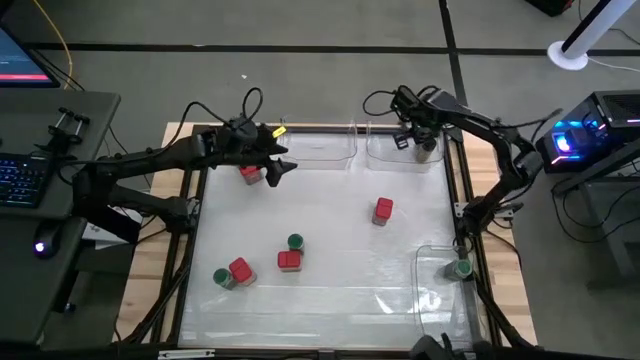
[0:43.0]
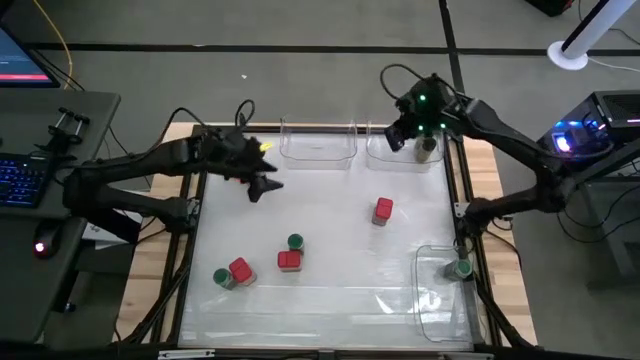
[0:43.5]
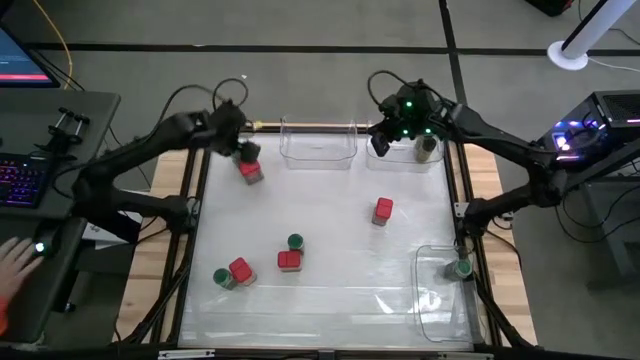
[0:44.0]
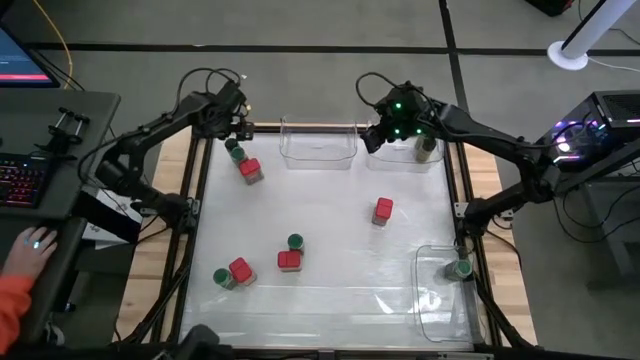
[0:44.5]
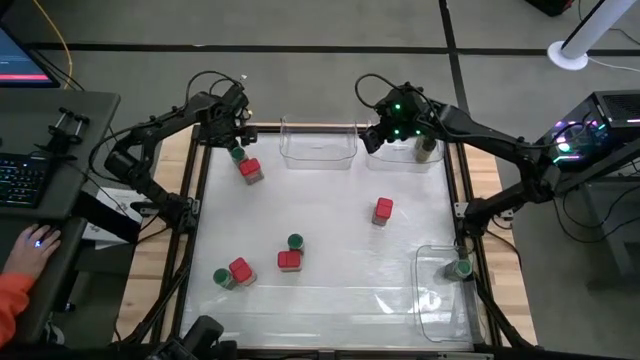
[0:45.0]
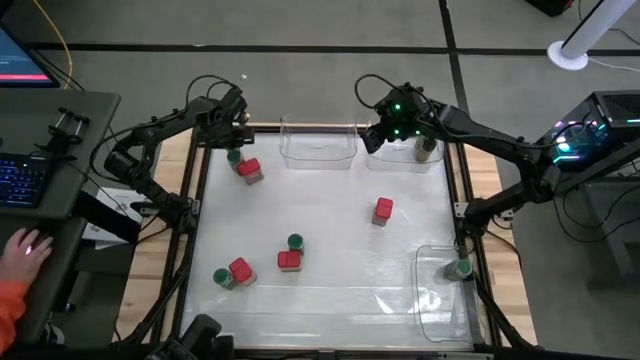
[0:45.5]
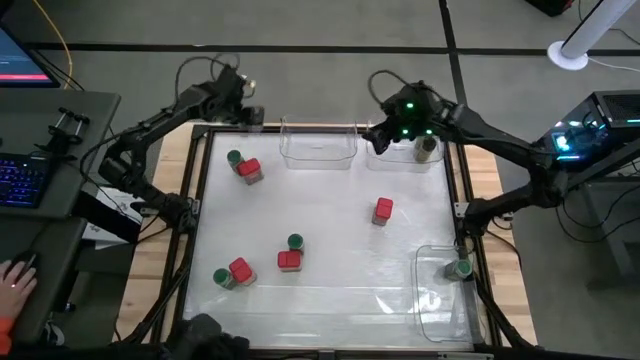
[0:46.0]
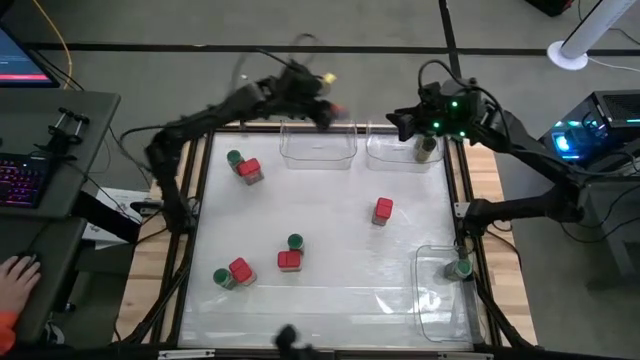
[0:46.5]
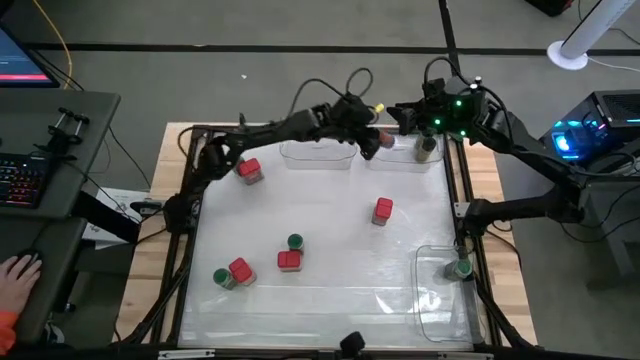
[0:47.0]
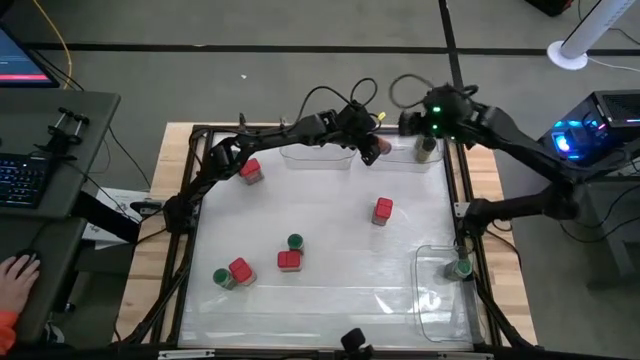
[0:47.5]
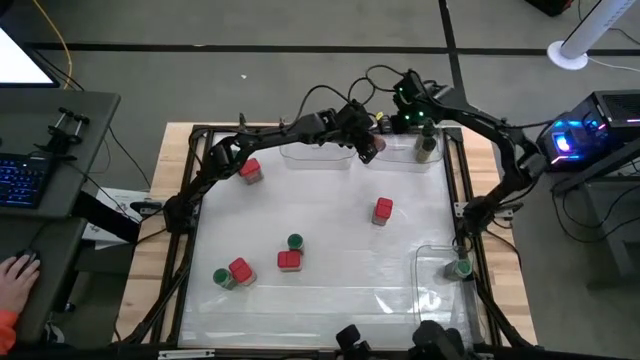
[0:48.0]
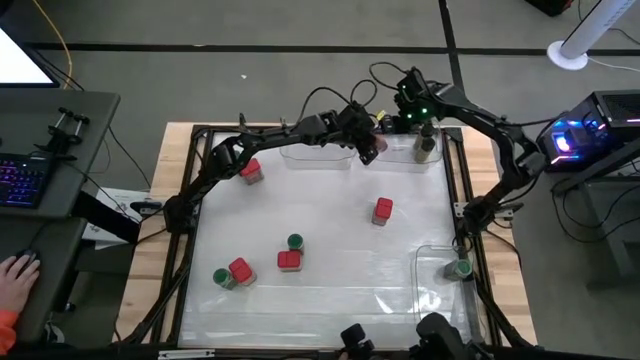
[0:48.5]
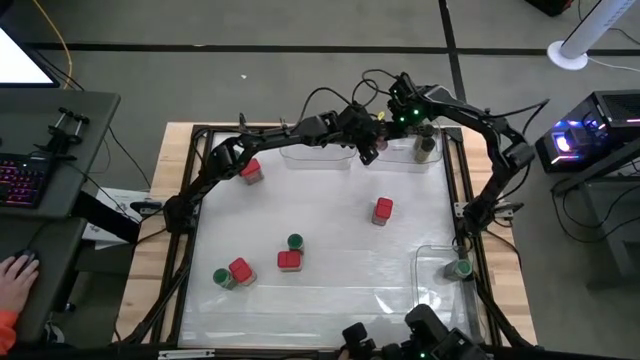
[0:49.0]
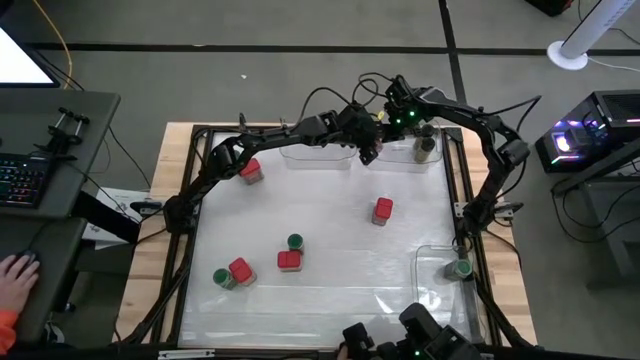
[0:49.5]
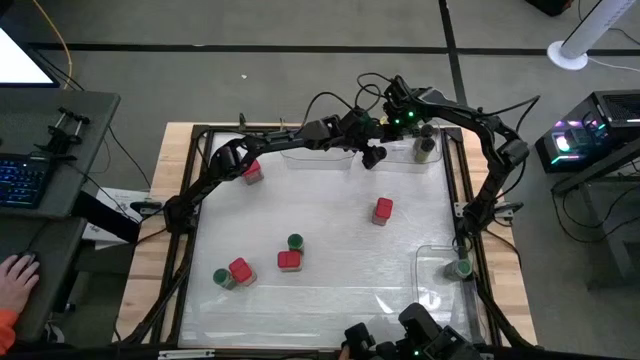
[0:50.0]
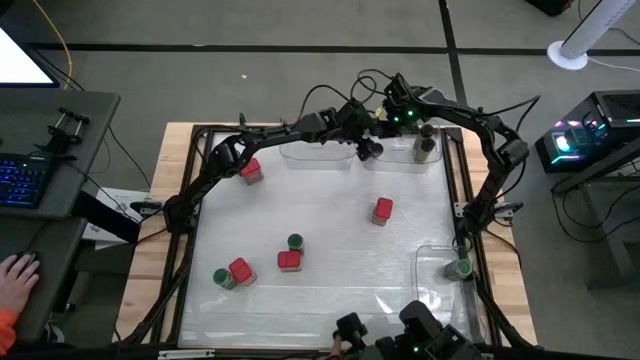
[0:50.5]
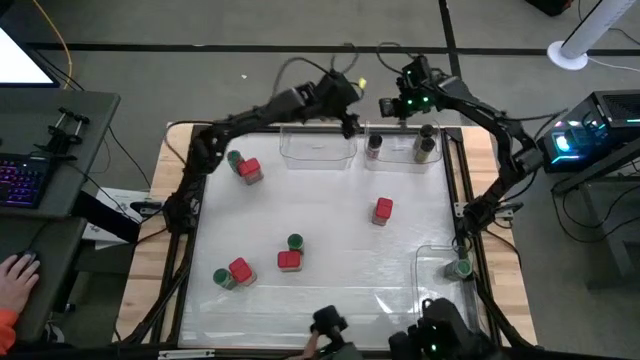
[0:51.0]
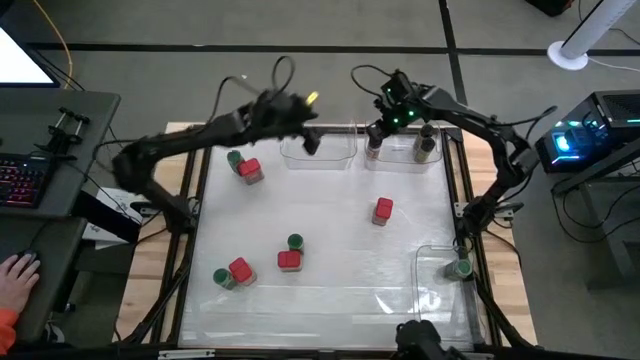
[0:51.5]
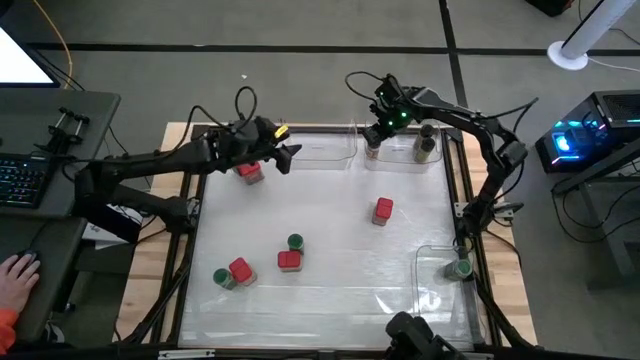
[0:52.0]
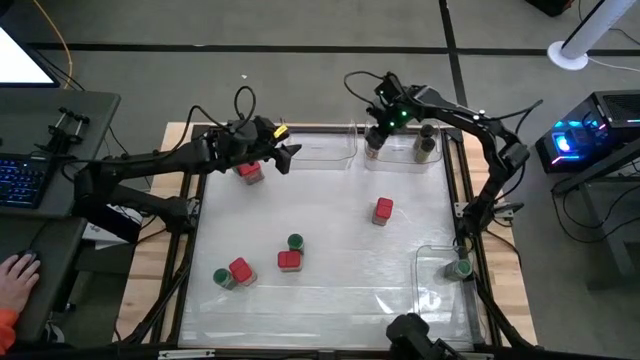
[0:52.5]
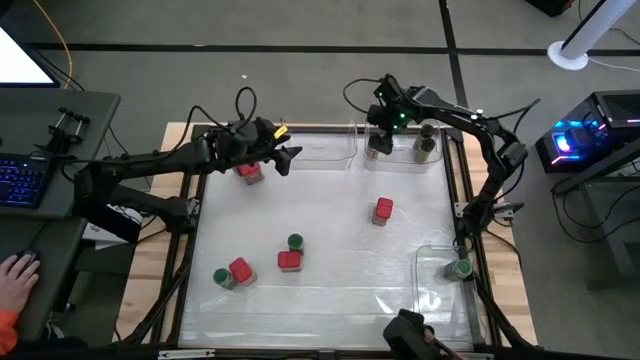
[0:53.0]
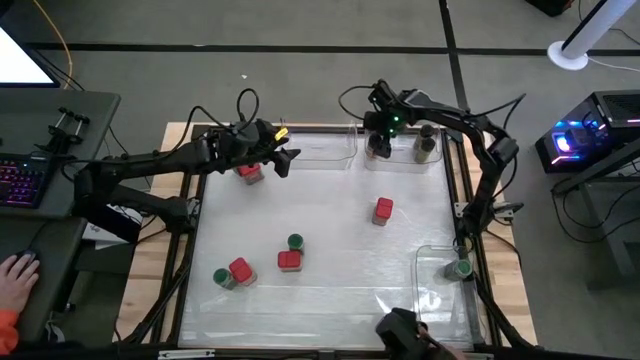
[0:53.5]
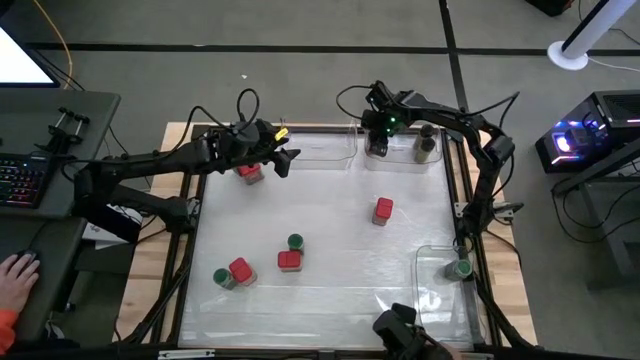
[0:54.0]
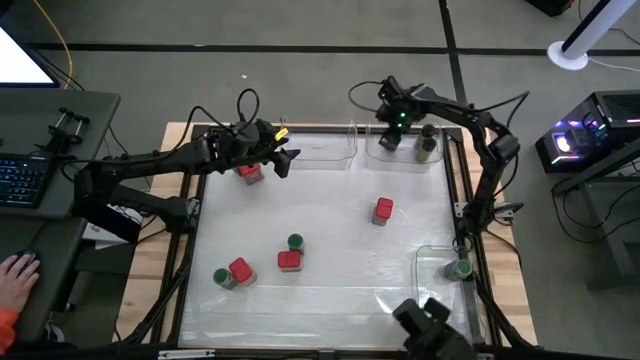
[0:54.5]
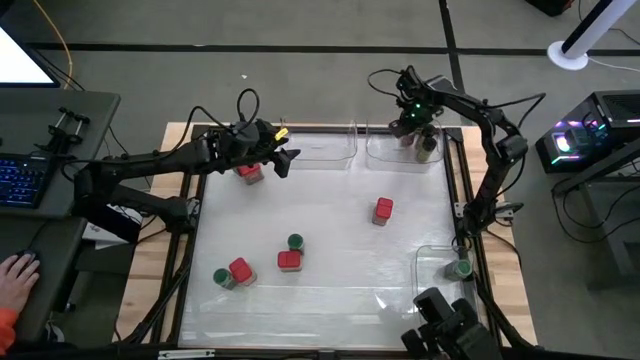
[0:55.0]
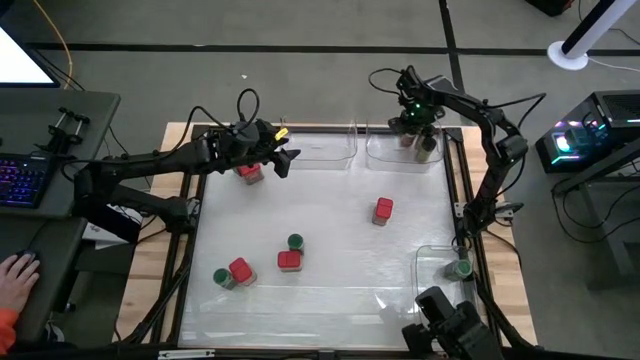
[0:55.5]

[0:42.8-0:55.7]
Task: Sort spices by type
Put the black seasoning bottle into the top right transparent bin

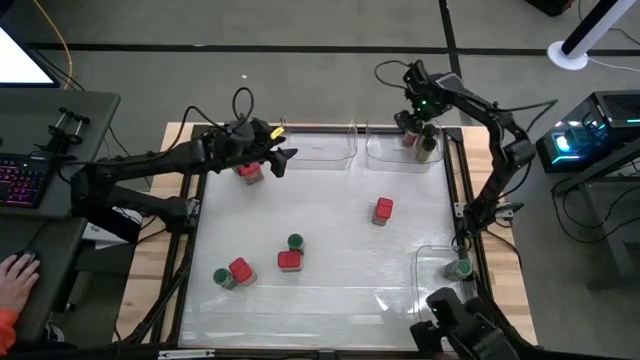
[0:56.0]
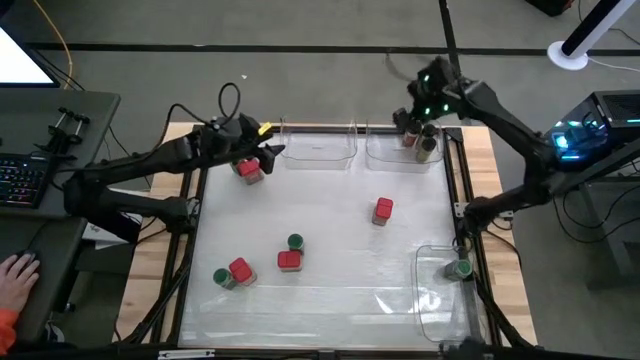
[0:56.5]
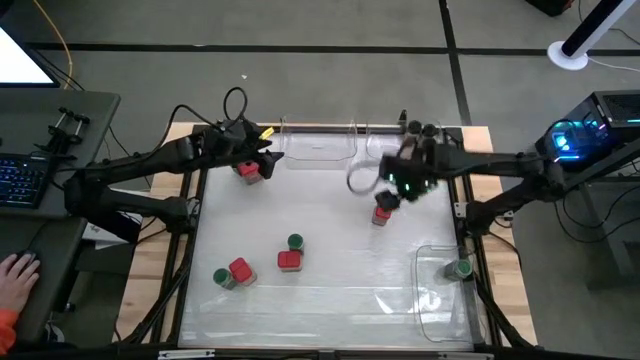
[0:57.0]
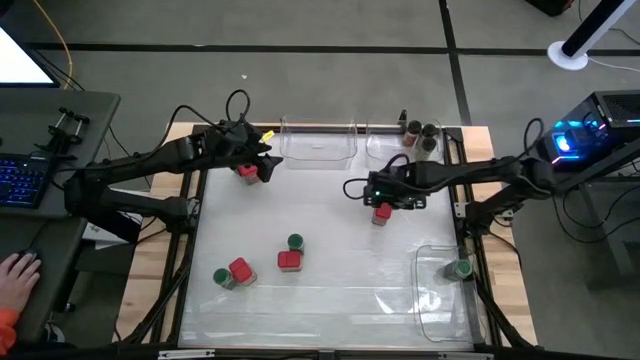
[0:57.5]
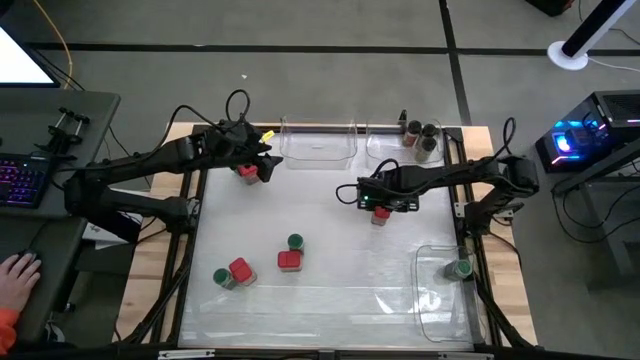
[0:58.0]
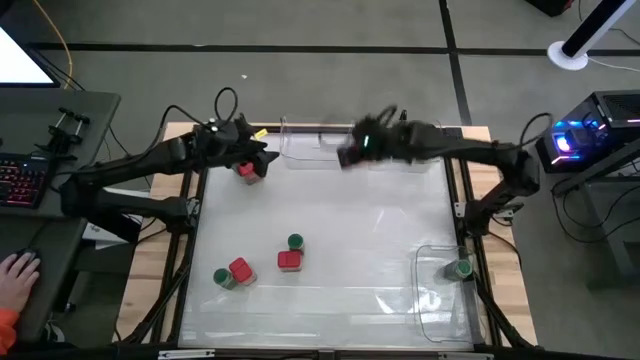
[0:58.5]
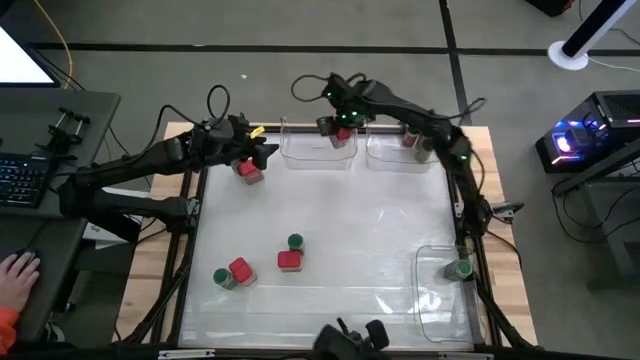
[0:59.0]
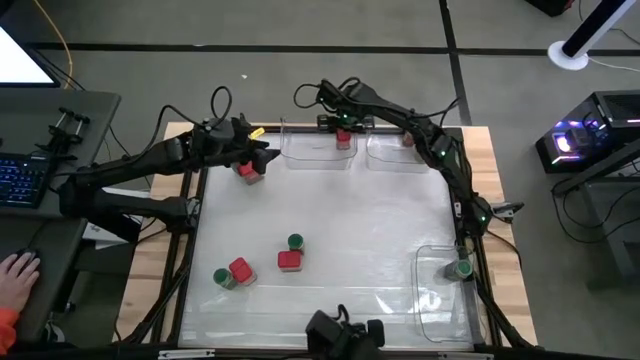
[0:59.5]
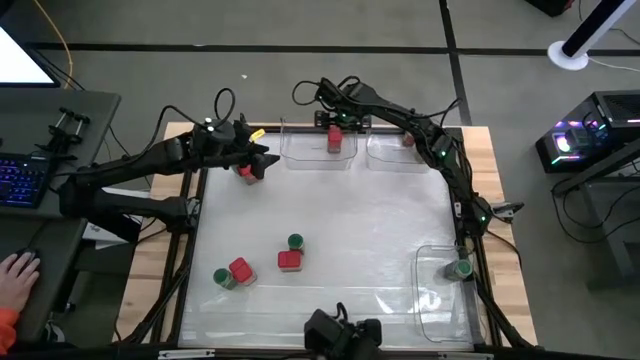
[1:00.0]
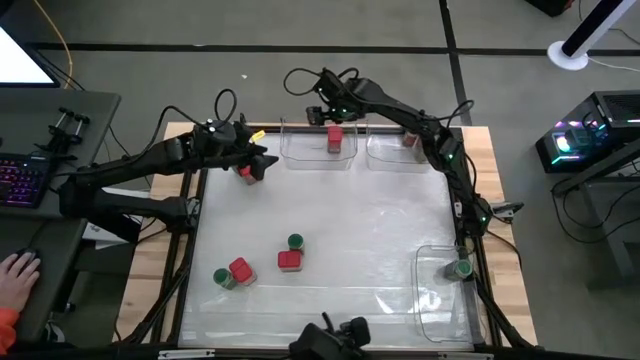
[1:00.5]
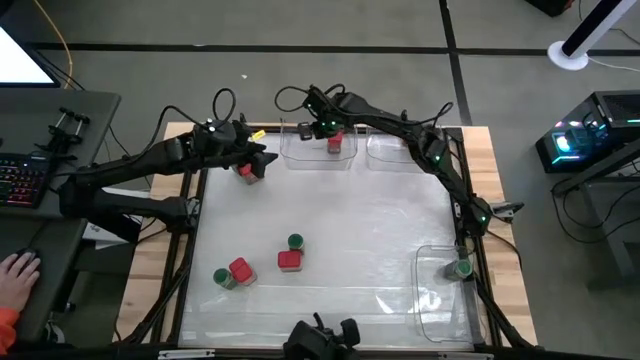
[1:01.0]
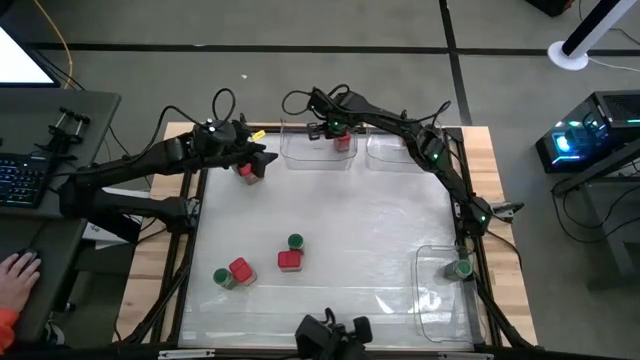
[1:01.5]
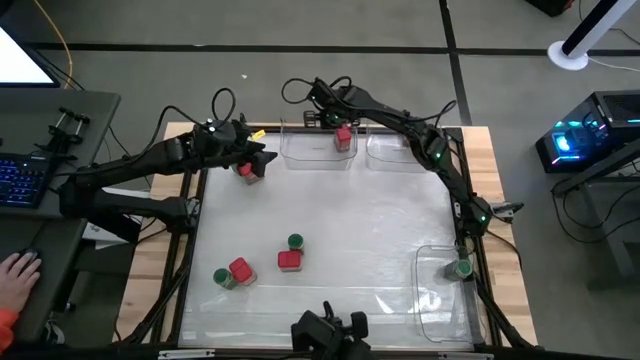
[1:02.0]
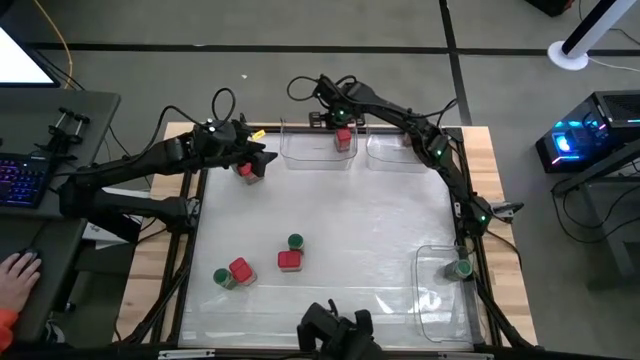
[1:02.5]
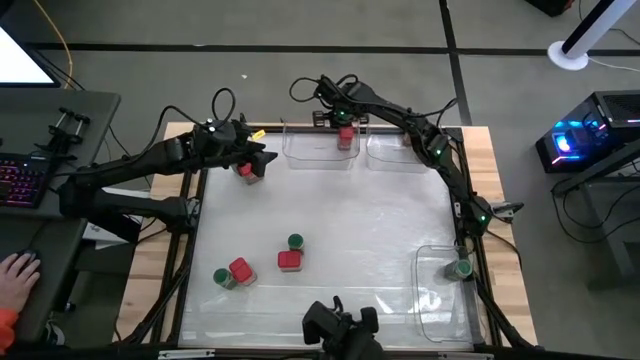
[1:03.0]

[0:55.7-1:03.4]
Put the red seasoning can into the left transparent bin
